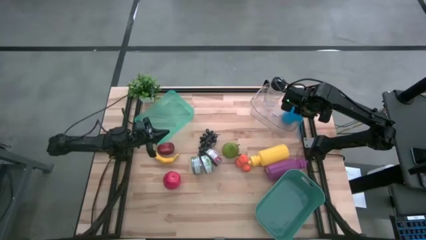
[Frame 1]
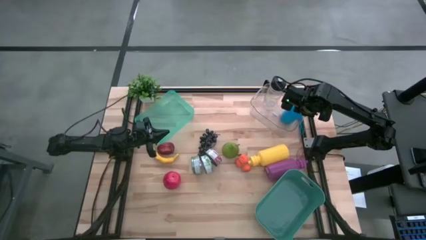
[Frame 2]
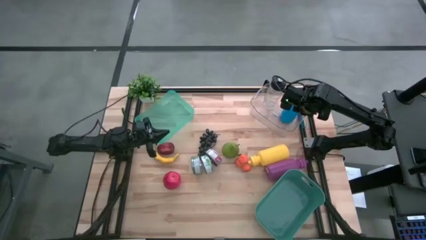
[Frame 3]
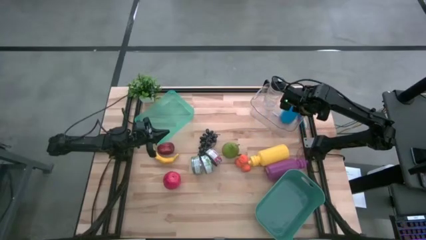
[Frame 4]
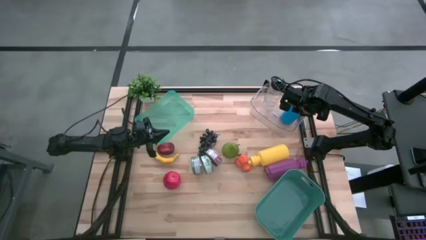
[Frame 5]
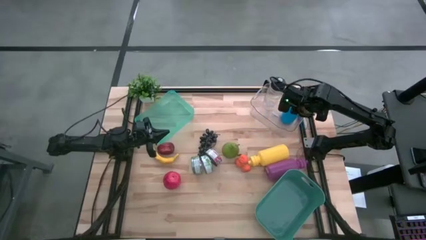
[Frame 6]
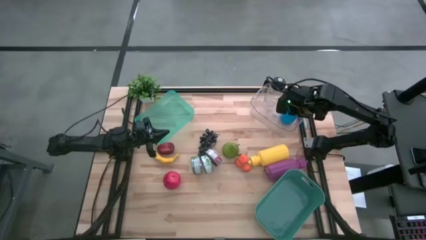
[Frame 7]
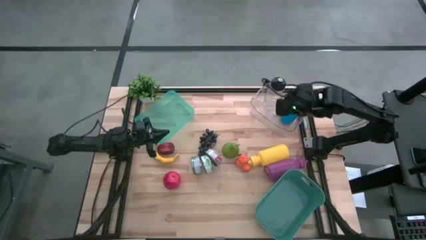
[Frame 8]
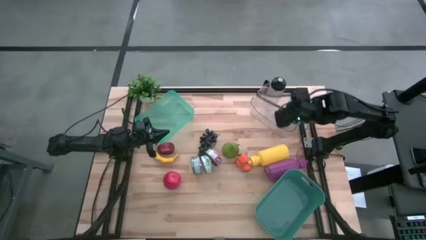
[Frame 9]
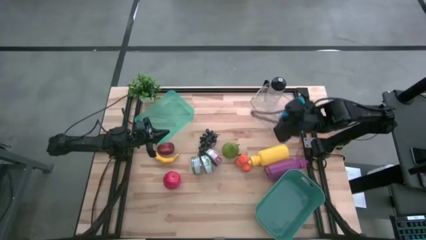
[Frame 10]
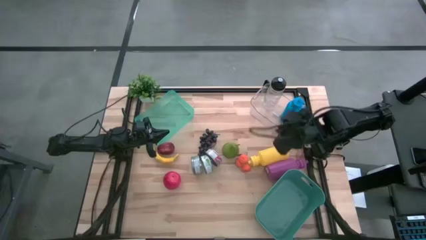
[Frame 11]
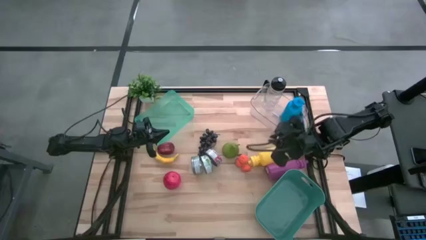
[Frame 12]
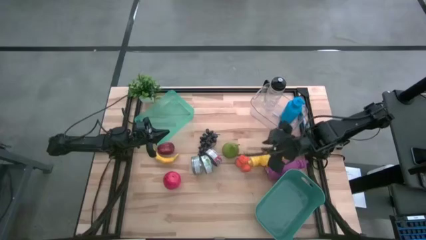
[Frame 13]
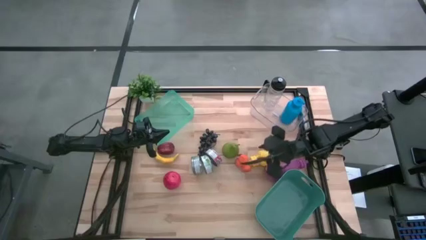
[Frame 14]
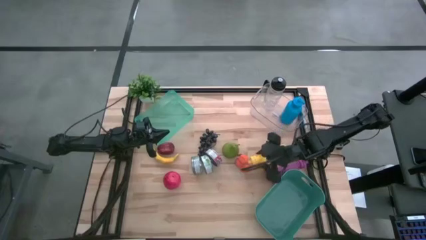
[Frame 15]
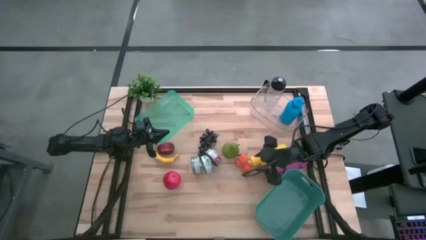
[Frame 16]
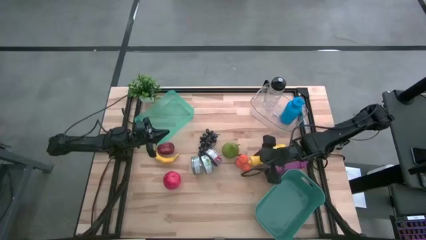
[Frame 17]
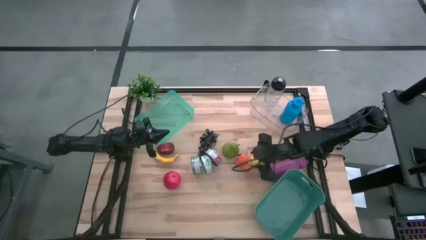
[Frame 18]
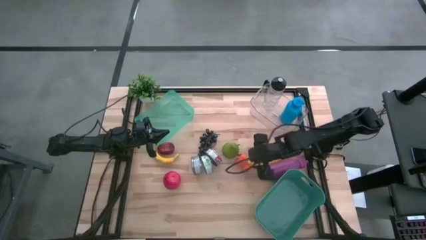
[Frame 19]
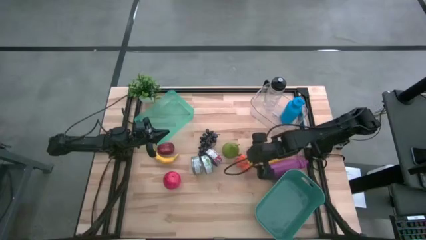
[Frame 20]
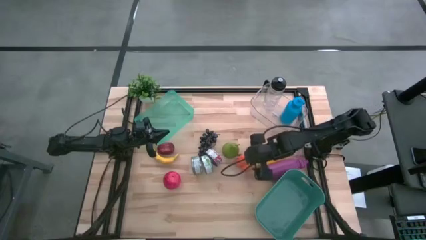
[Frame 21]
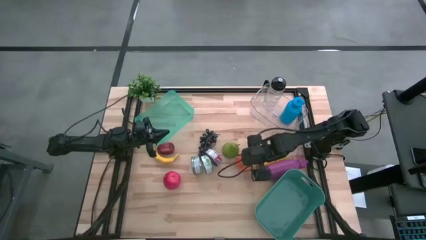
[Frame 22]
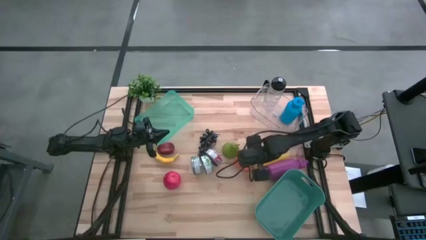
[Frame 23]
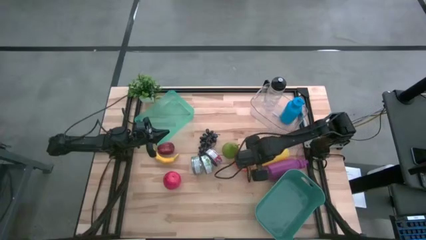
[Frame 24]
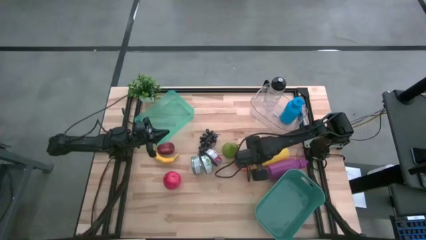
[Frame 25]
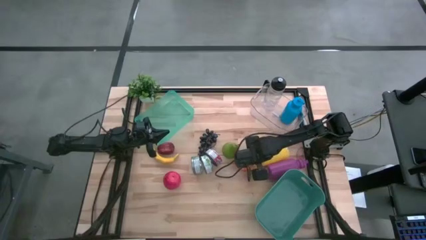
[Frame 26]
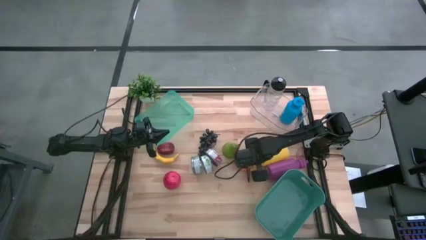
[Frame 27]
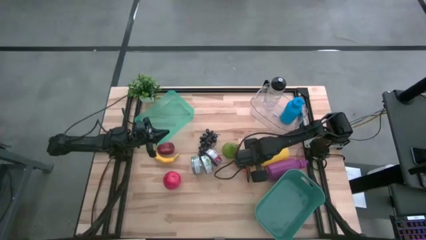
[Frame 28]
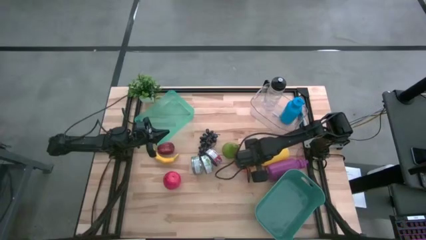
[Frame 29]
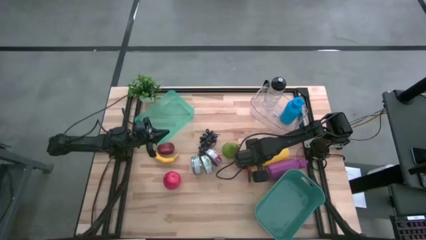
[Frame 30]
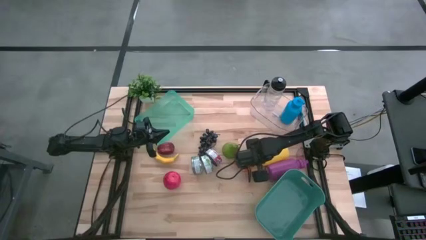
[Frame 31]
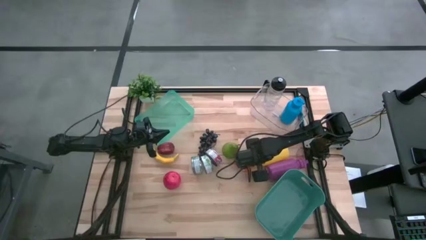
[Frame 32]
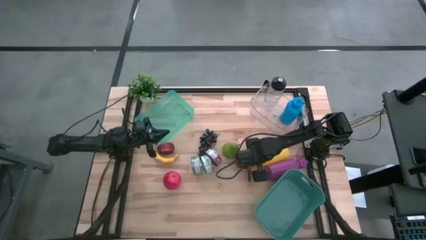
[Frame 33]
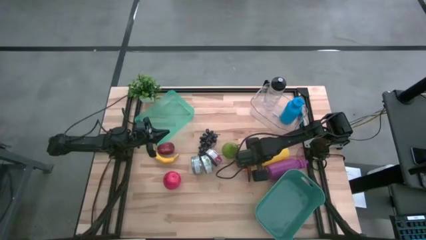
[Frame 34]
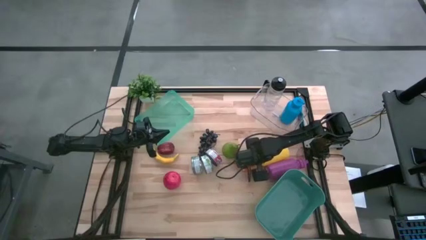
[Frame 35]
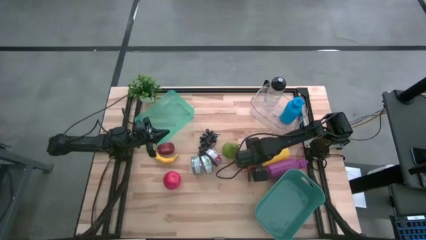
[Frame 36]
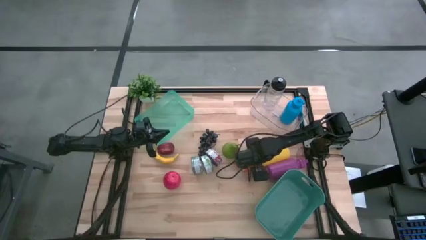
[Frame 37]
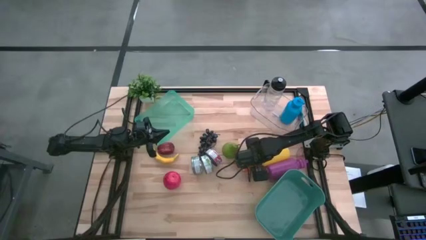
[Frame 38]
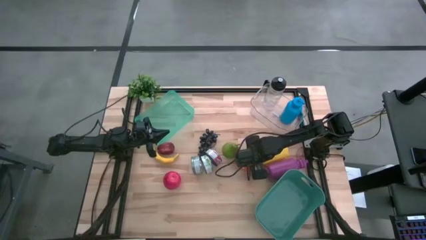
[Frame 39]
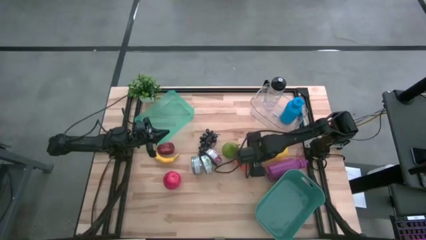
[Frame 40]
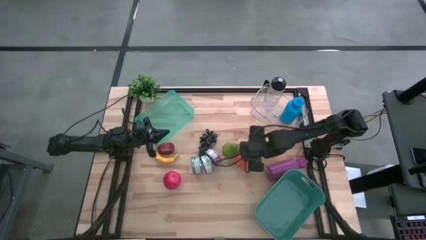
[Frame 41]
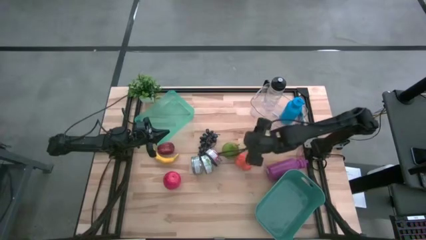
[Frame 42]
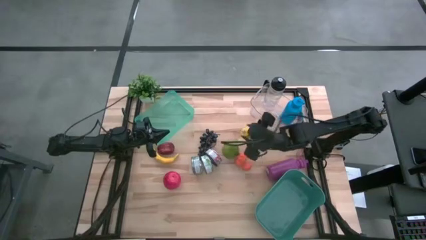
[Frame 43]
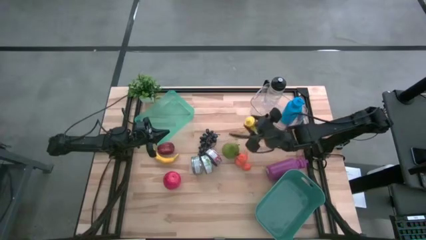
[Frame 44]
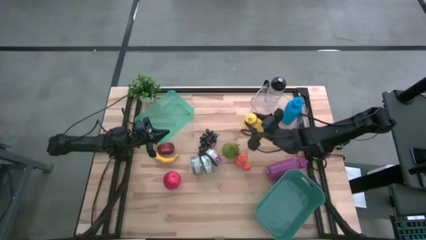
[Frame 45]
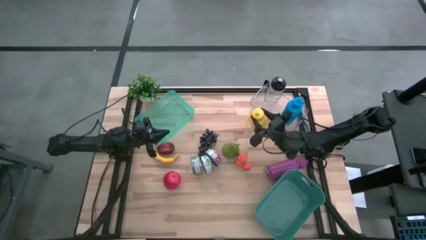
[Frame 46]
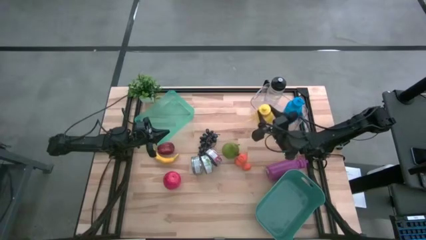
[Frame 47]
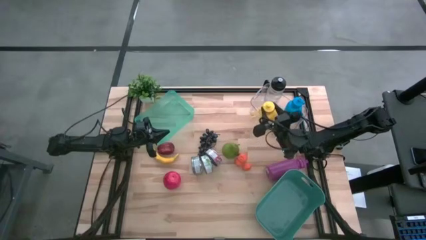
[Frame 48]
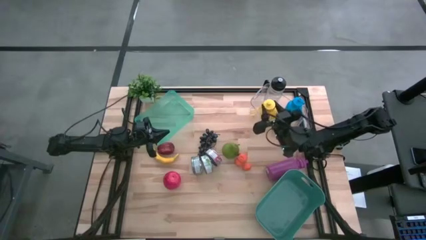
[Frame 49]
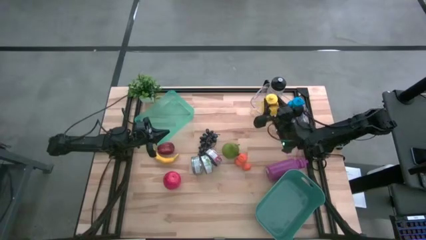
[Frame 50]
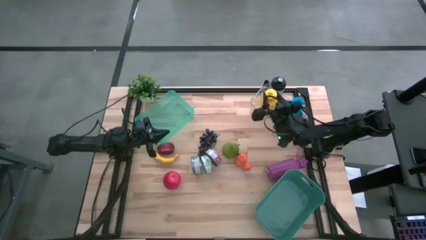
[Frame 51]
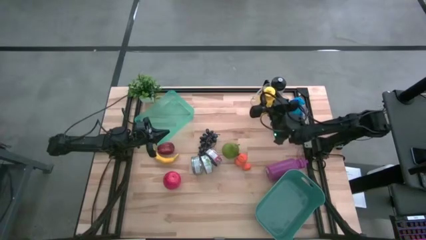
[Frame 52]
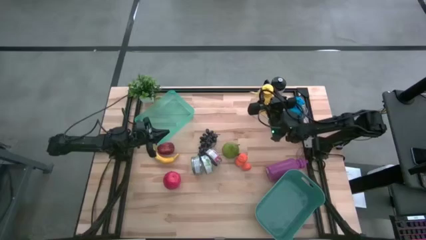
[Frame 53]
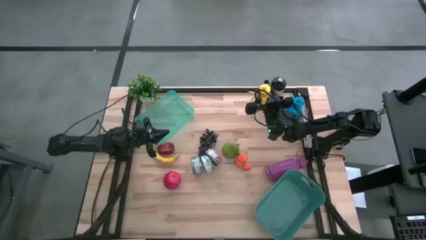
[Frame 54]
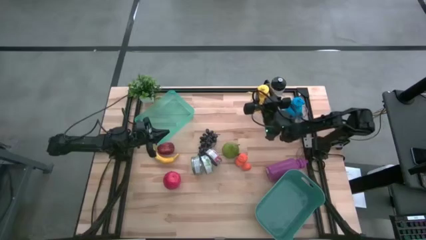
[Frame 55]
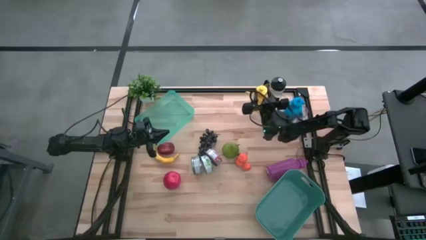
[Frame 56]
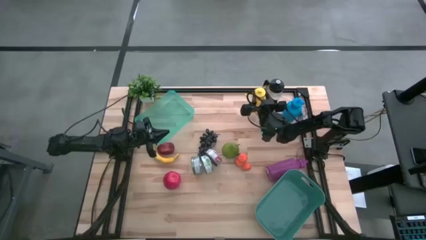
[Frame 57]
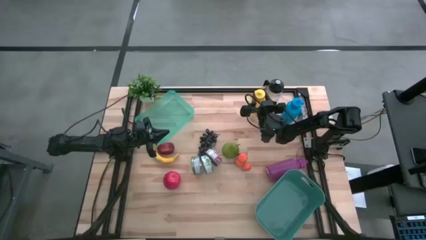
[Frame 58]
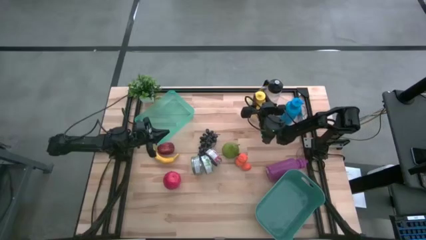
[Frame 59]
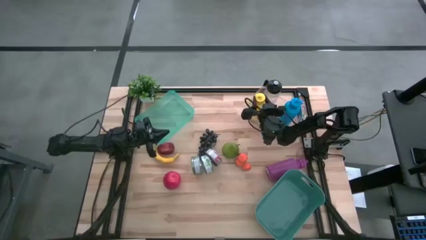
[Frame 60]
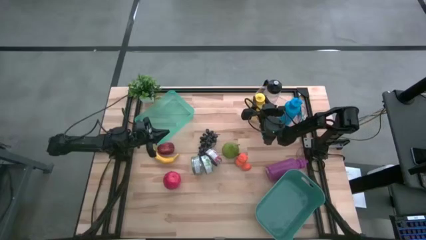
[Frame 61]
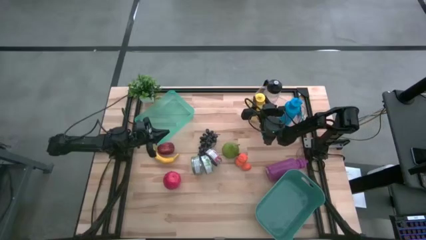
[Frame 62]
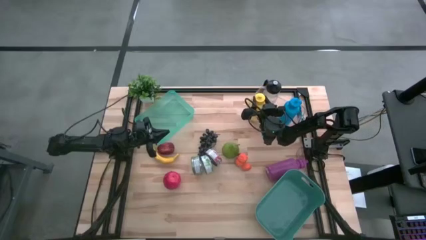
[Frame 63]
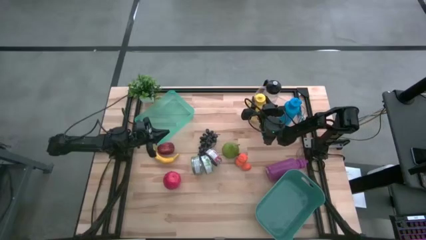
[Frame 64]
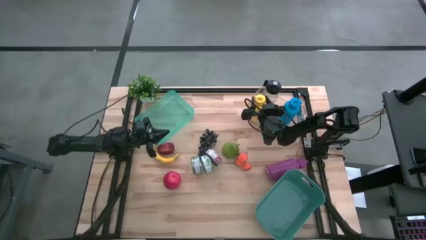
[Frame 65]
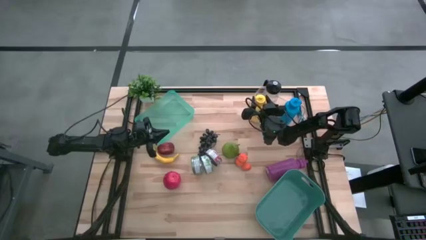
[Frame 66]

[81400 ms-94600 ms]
Task: Pick & Place Food Item
Put the yellow water bottle into the transparent bin
